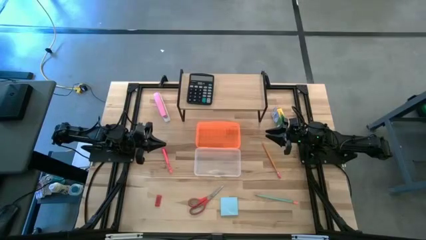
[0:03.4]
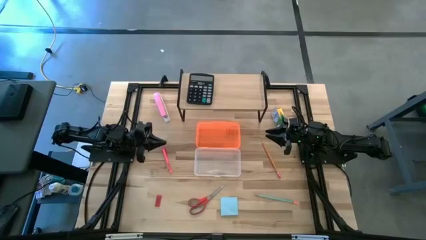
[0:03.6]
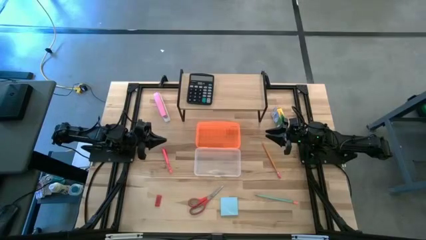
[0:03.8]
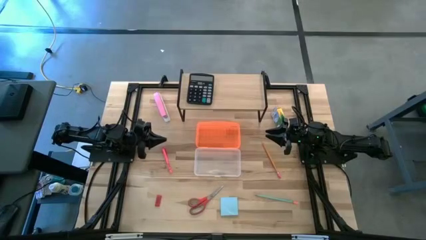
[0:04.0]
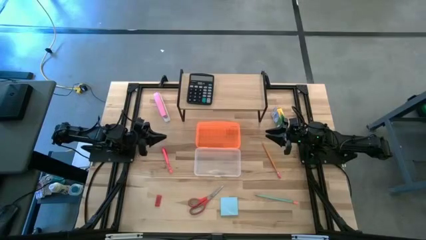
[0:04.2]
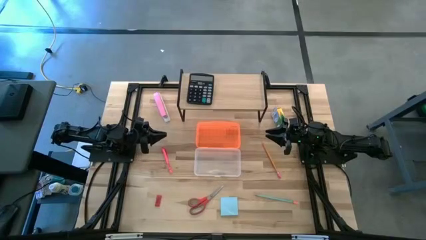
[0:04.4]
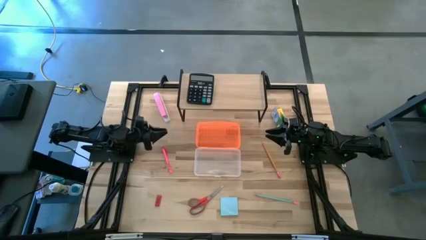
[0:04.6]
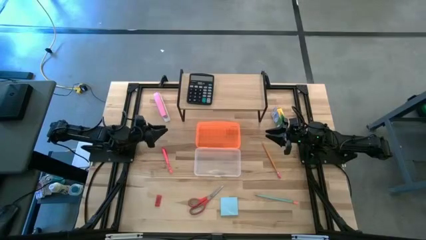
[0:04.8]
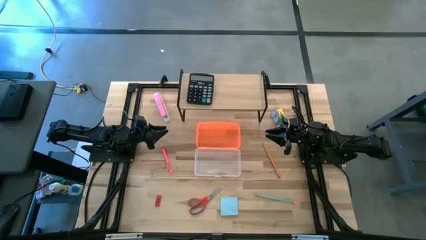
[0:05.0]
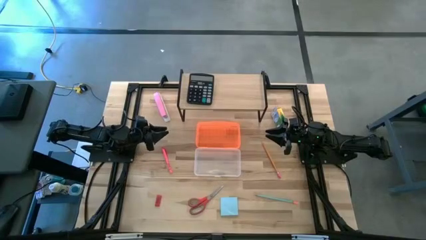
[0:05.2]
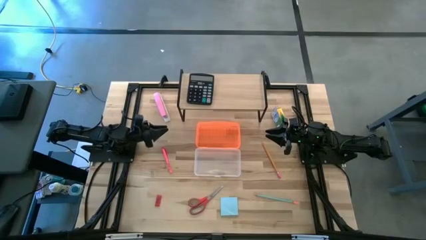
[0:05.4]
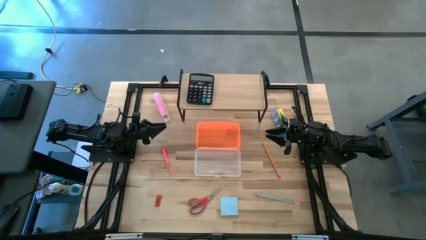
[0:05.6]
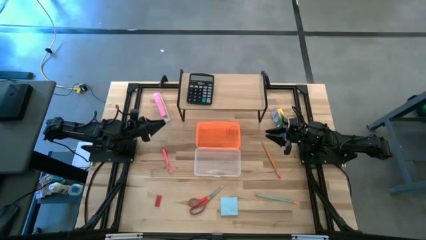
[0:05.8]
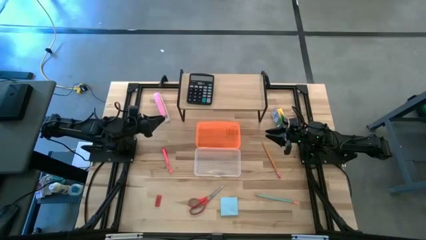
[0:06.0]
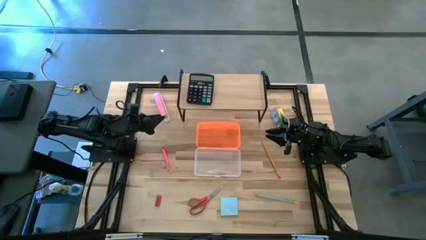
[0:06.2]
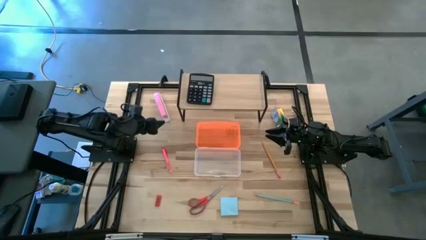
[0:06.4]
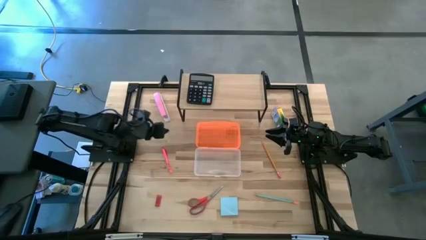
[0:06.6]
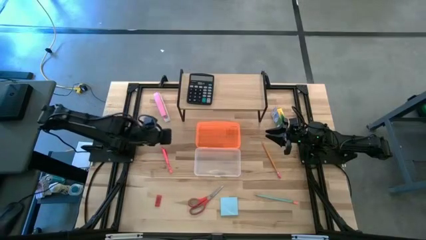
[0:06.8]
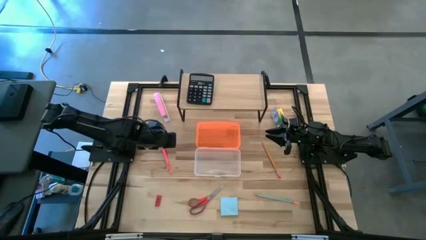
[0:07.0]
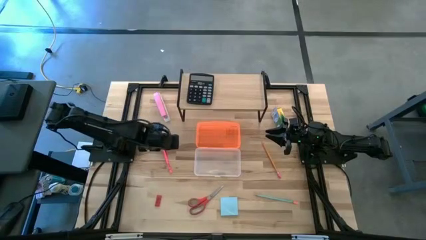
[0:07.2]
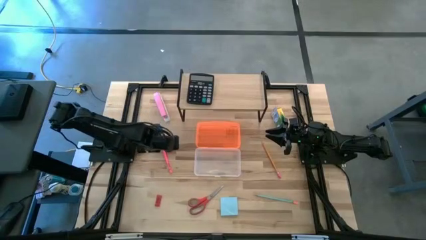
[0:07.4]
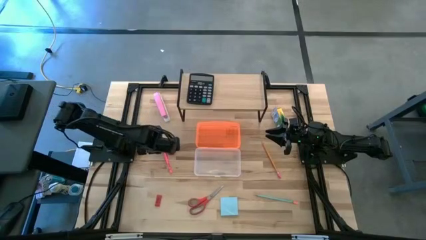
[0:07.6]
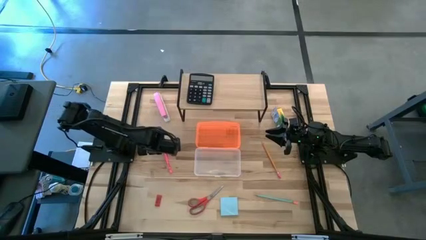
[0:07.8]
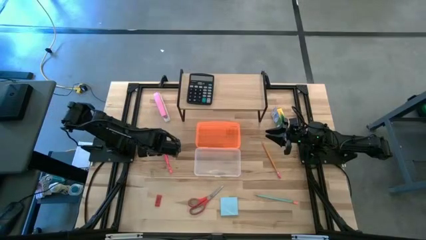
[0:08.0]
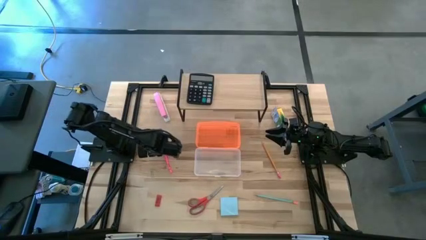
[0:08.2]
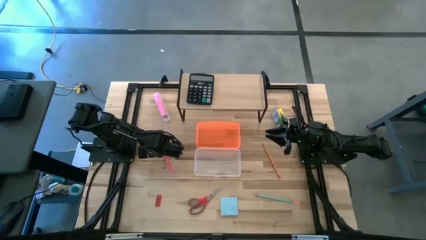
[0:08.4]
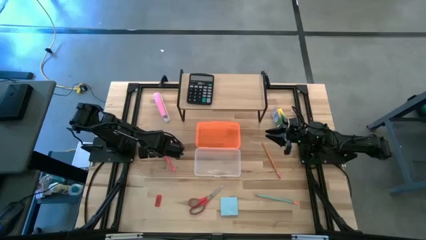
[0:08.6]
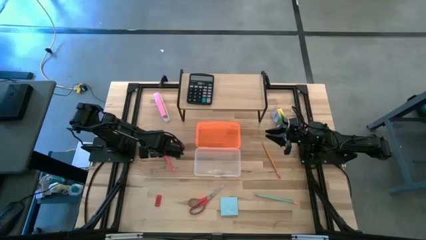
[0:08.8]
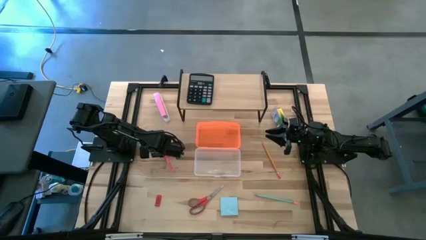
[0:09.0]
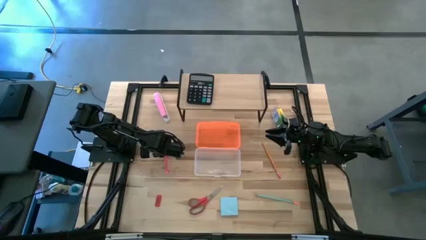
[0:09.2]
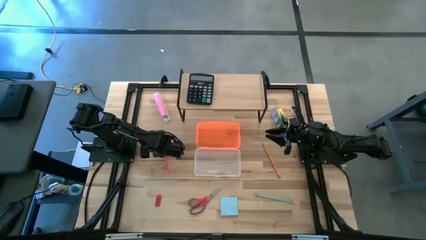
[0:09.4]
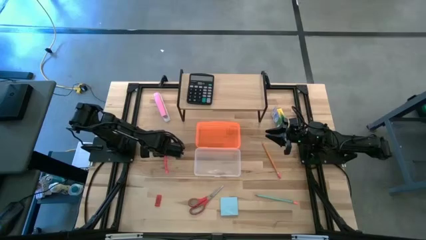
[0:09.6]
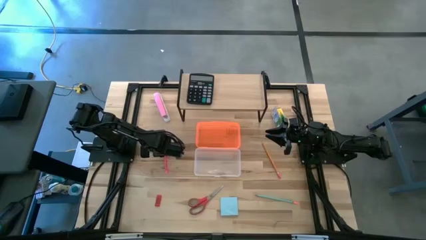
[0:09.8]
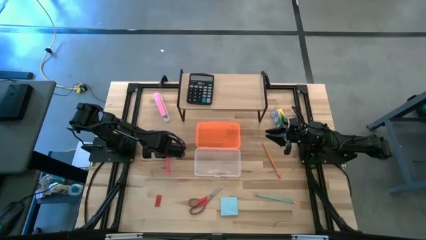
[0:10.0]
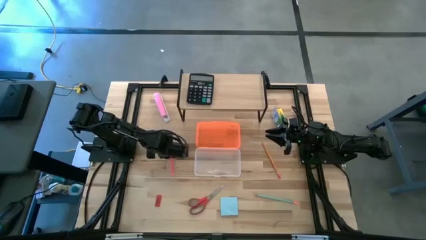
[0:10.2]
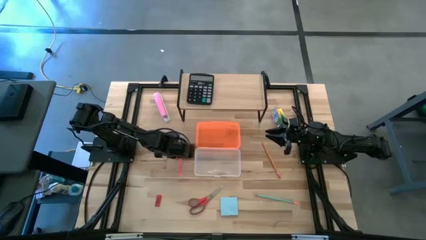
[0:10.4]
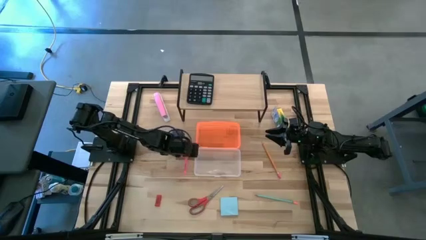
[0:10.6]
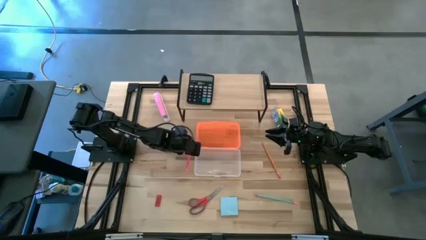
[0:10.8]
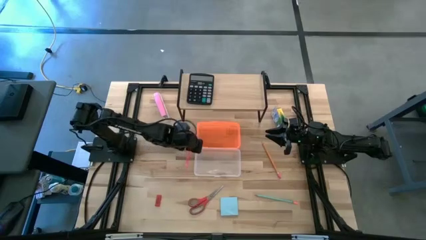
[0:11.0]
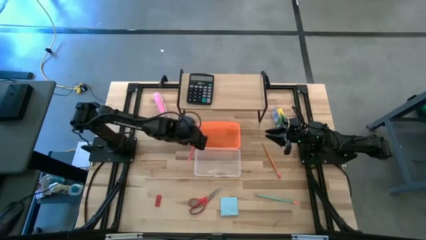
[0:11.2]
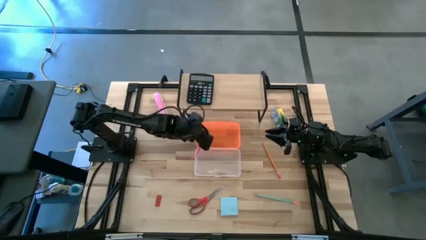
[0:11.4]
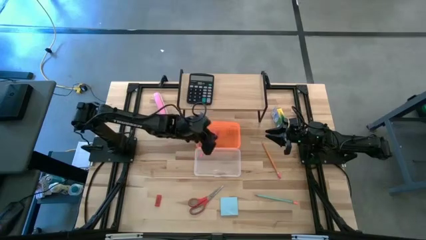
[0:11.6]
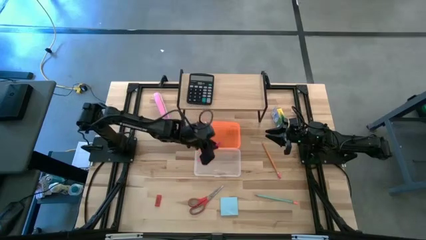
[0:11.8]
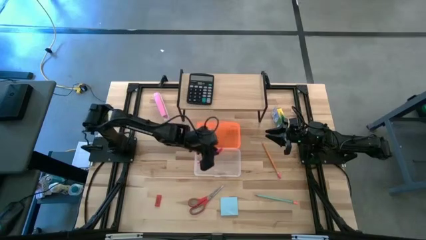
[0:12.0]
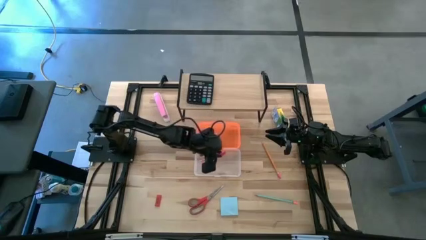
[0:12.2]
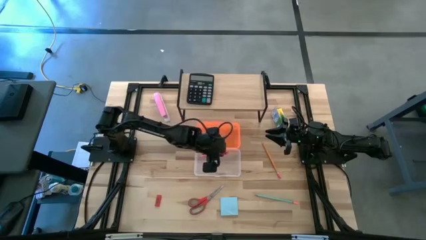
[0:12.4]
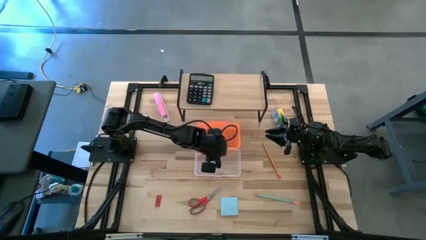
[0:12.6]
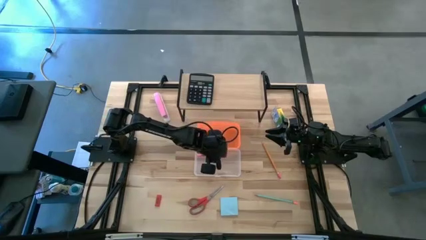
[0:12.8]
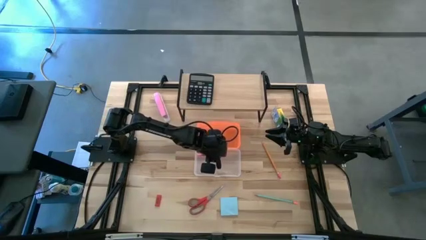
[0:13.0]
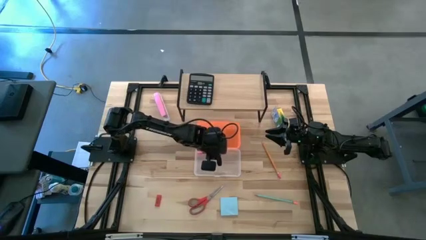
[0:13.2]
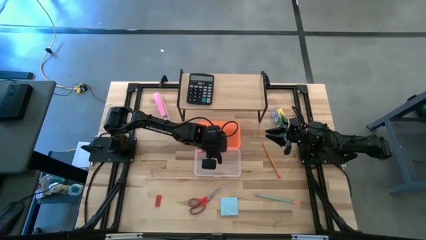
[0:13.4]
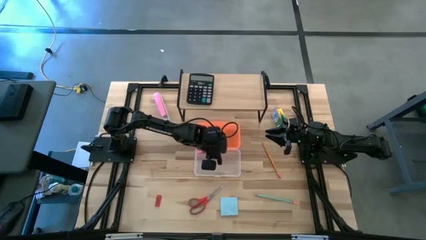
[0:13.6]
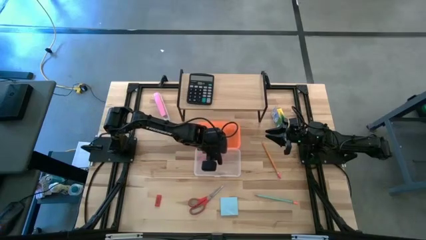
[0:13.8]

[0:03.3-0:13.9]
Task: Pack school essentials
Put the pink pen into the supply box

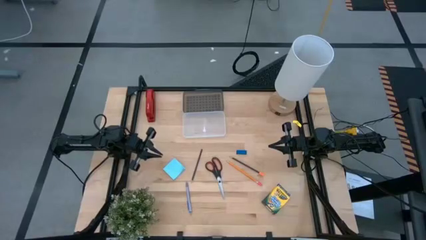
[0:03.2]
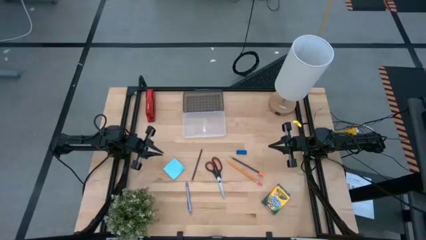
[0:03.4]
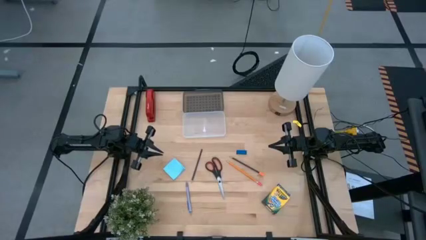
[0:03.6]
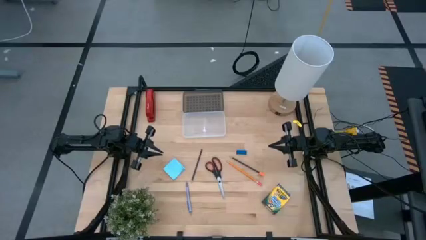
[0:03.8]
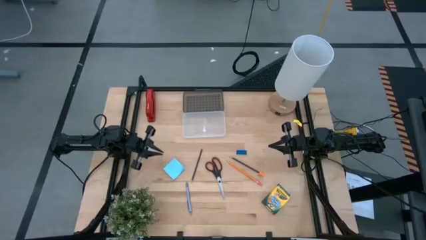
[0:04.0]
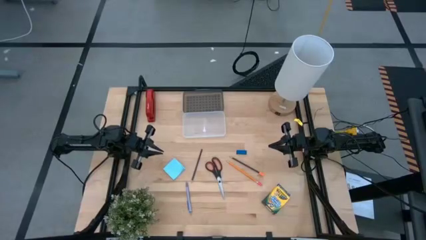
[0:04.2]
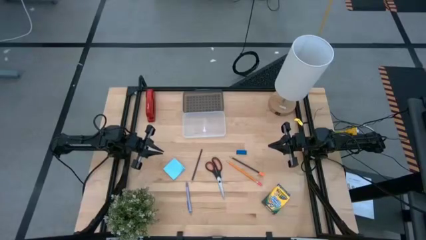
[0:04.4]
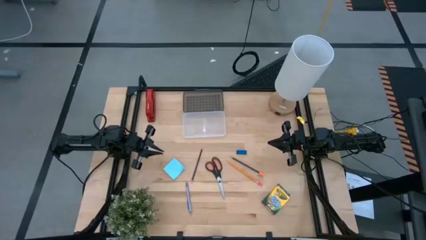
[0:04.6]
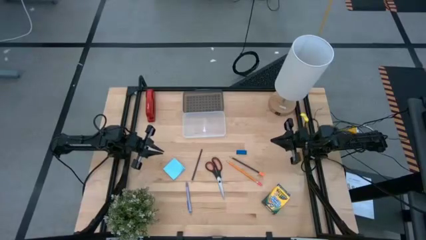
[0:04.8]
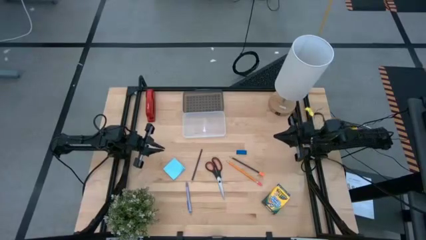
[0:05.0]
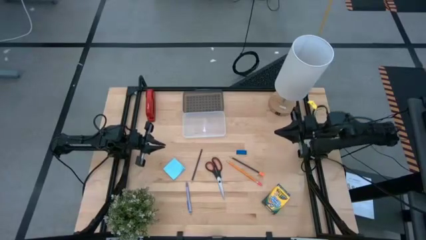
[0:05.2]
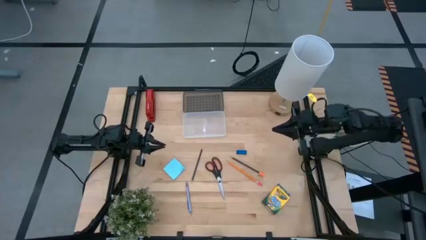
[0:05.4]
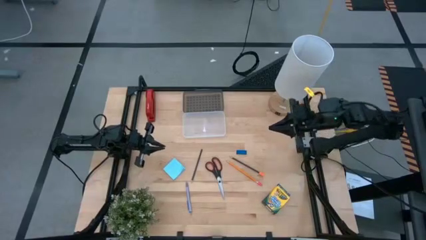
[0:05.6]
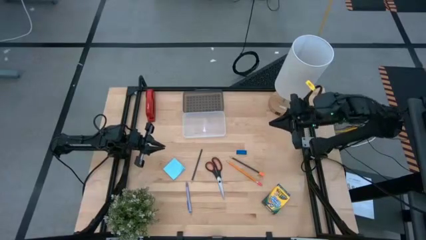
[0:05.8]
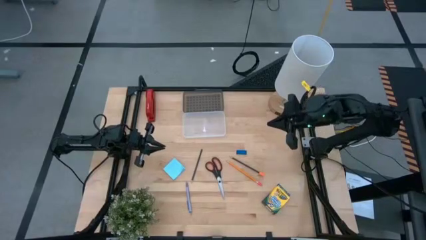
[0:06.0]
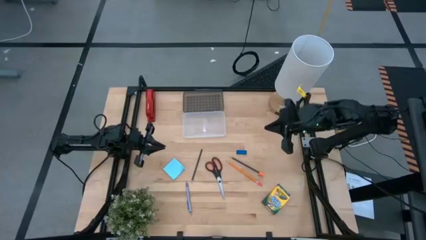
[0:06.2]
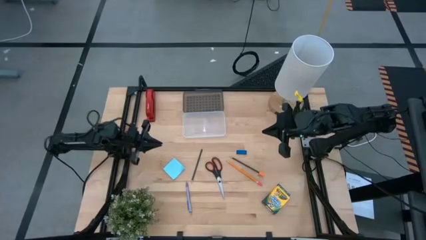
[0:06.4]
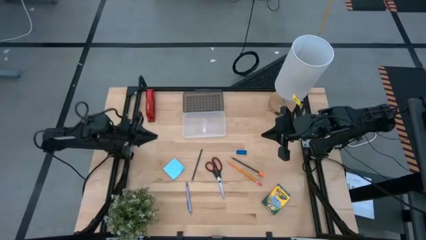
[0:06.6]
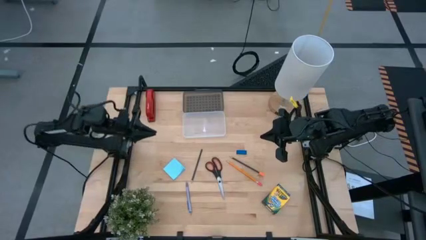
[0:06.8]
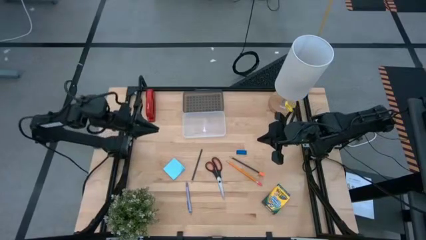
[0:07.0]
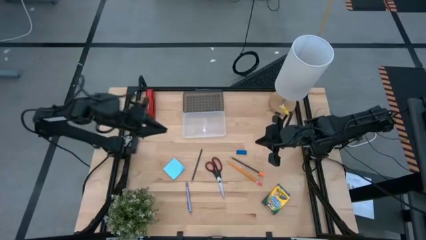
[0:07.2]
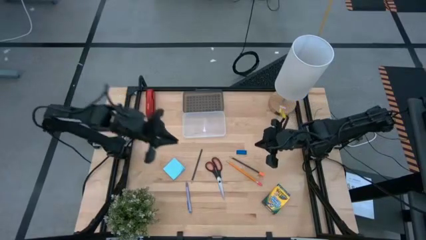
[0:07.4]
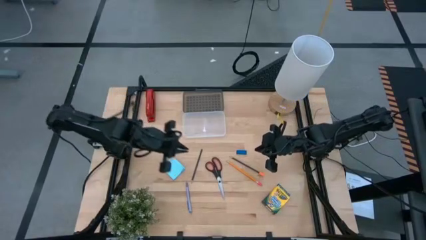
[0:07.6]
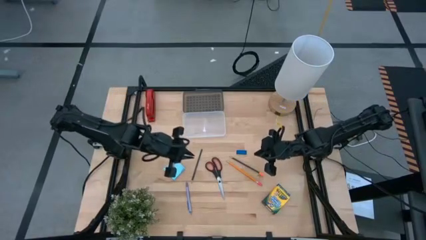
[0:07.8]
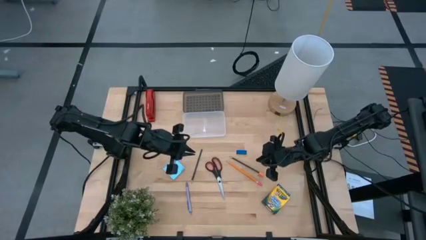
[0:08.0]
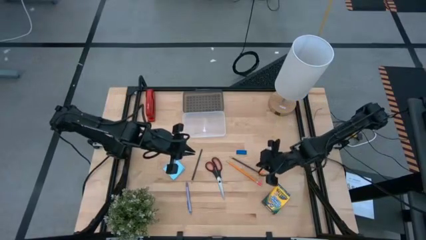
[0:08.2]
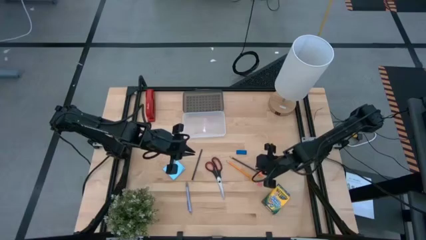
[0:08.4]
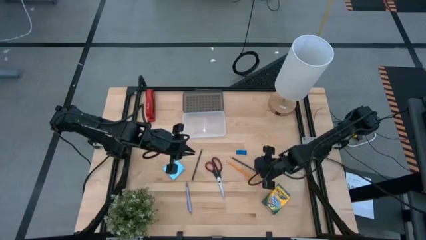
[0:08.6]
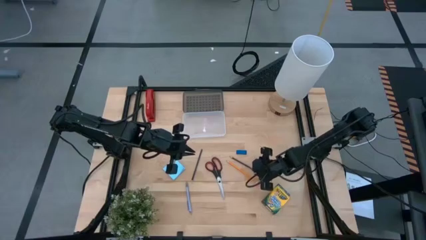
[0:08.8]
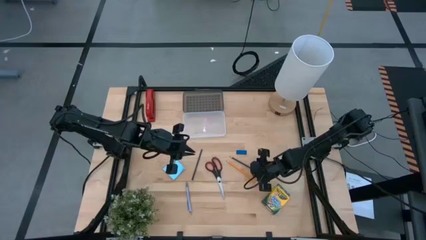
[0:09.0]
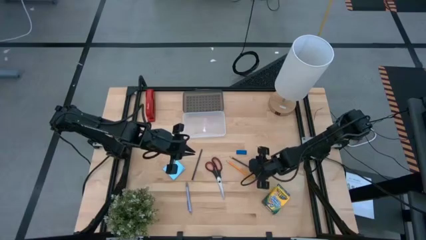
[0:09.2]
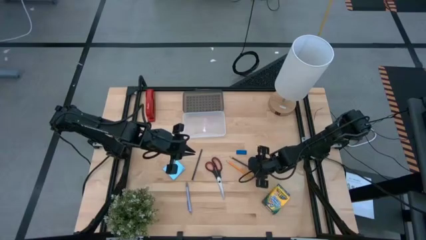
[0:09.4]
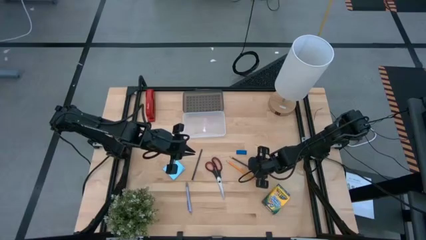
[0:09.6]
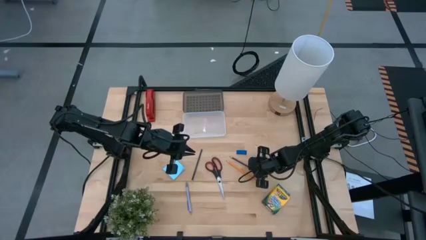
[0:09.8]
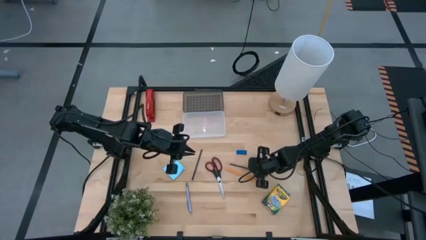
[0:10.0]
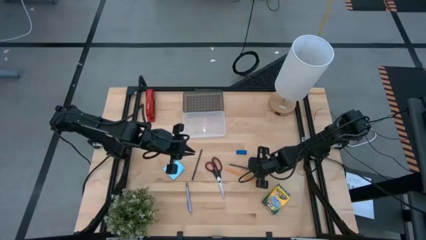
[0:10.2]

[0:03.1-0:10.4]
Task: Pack school essentials
Put the blue pencil into the black supply box
